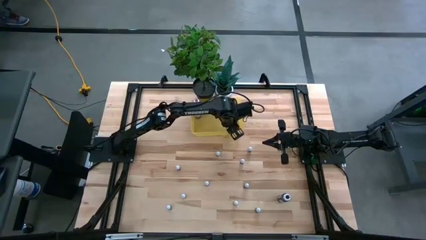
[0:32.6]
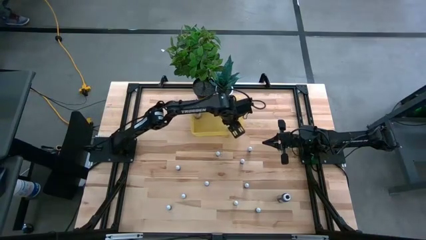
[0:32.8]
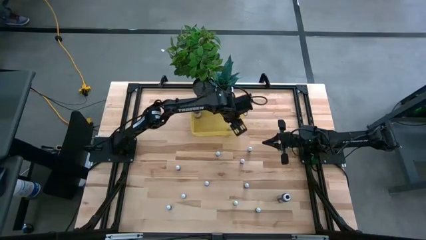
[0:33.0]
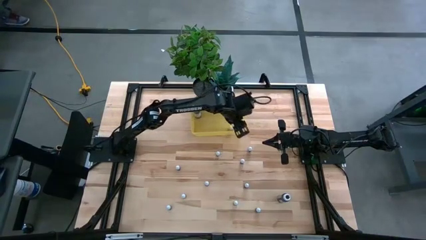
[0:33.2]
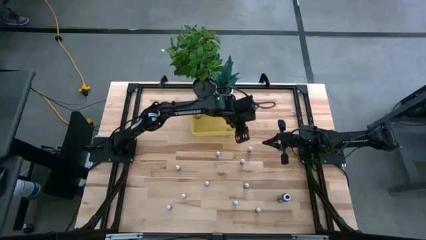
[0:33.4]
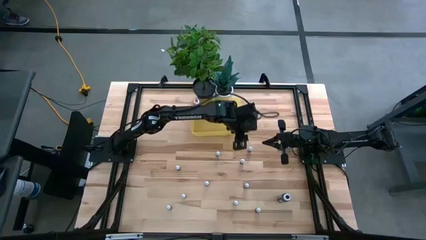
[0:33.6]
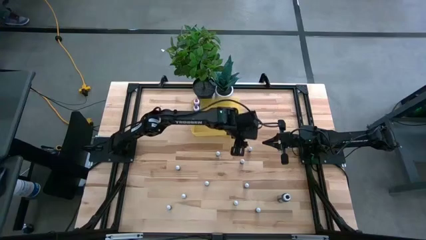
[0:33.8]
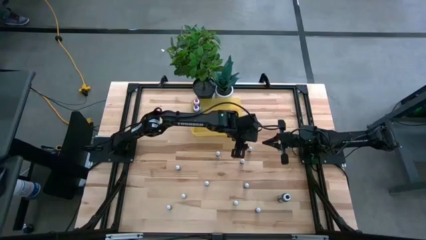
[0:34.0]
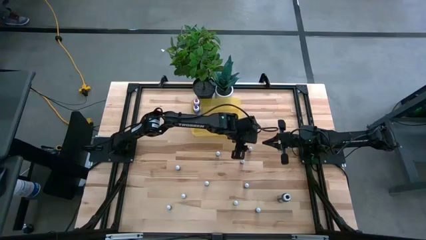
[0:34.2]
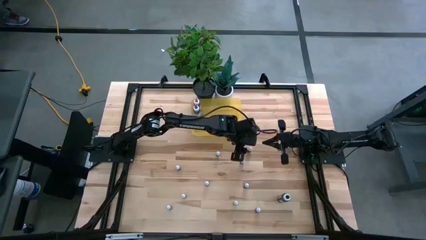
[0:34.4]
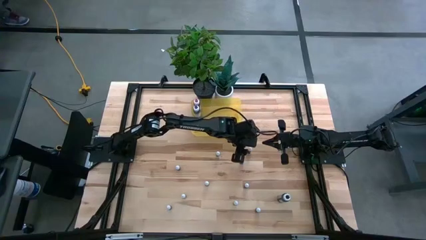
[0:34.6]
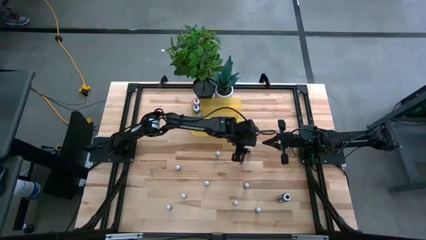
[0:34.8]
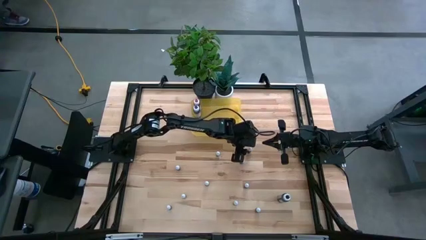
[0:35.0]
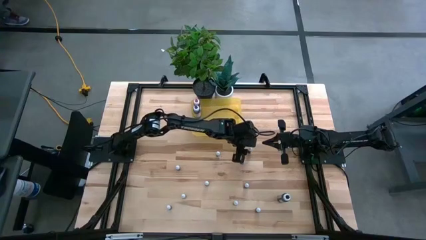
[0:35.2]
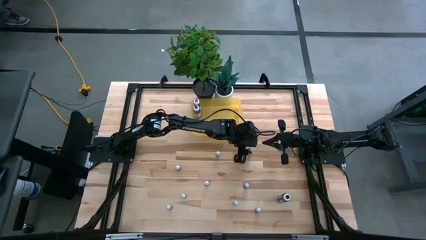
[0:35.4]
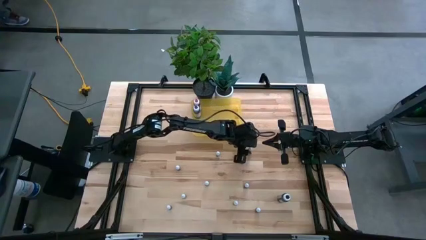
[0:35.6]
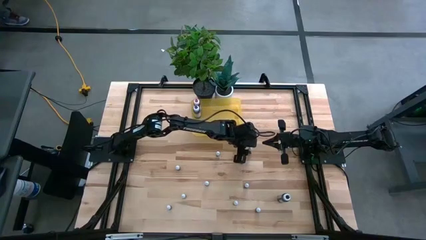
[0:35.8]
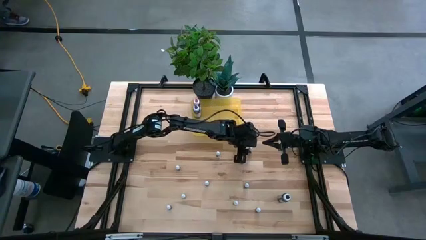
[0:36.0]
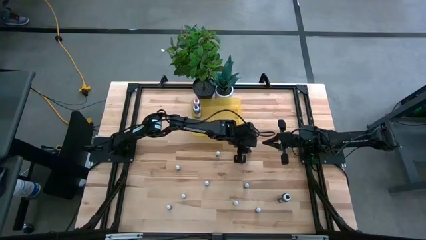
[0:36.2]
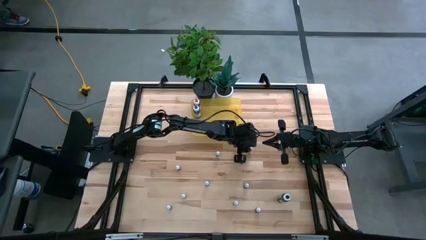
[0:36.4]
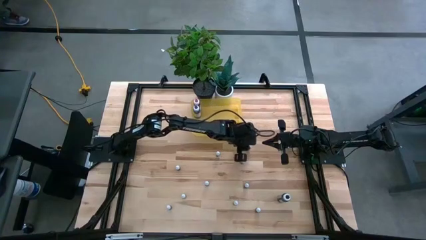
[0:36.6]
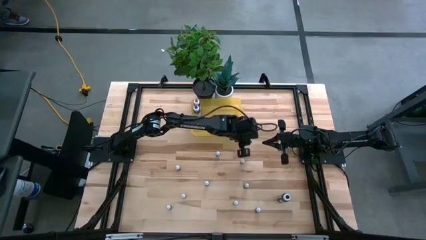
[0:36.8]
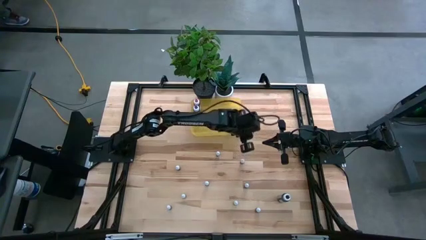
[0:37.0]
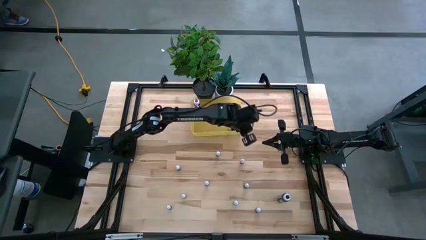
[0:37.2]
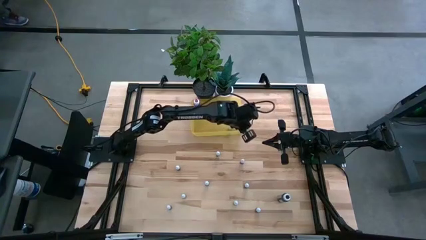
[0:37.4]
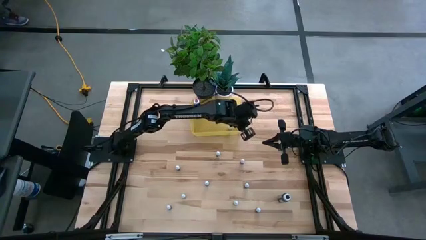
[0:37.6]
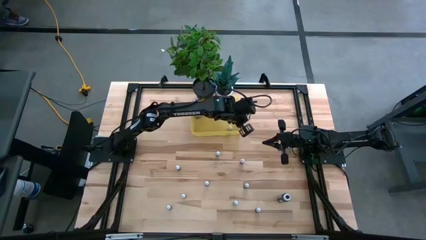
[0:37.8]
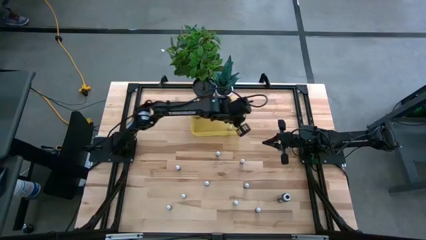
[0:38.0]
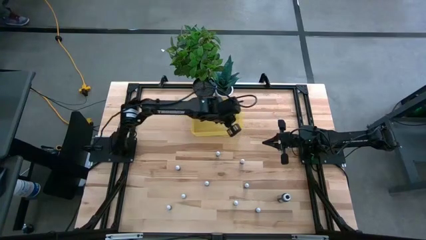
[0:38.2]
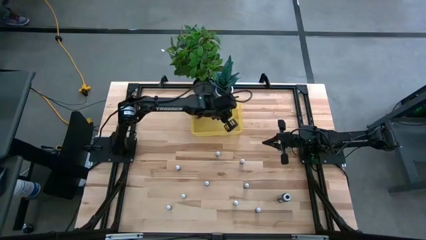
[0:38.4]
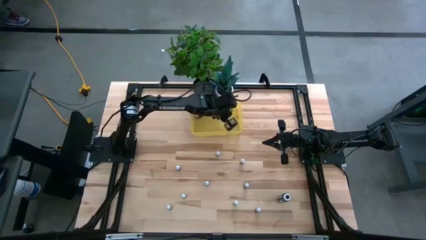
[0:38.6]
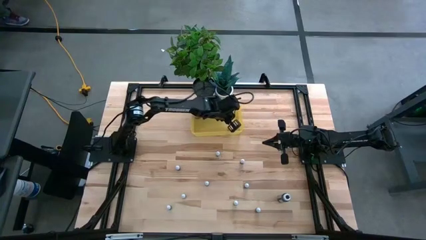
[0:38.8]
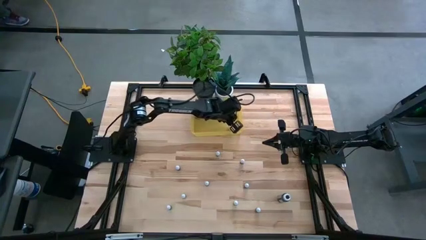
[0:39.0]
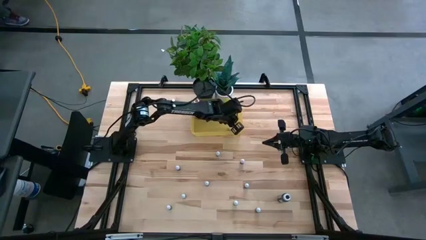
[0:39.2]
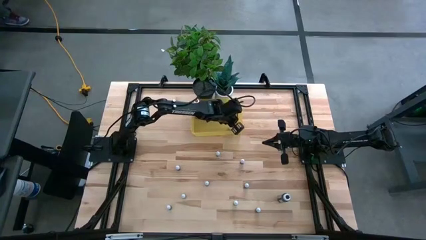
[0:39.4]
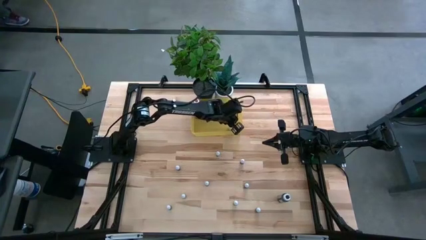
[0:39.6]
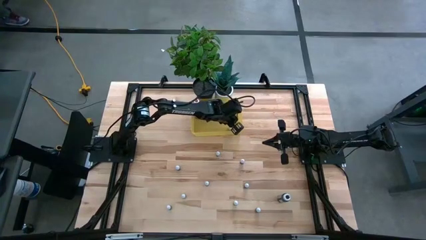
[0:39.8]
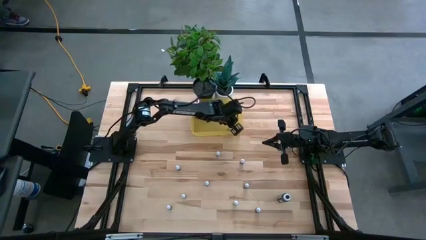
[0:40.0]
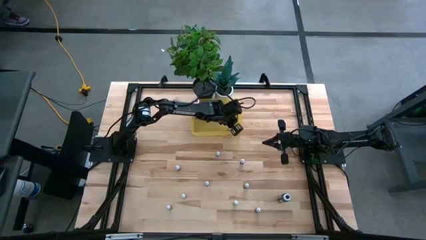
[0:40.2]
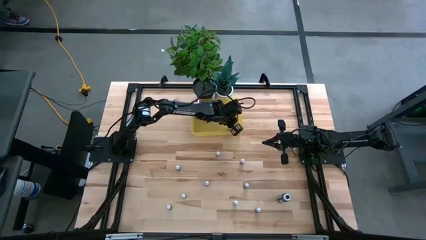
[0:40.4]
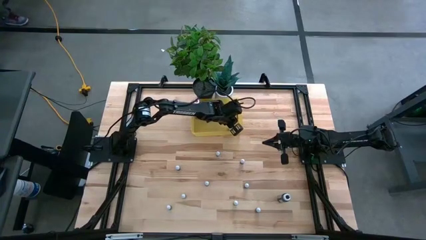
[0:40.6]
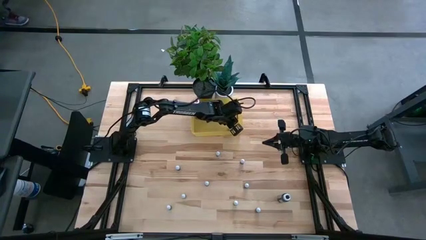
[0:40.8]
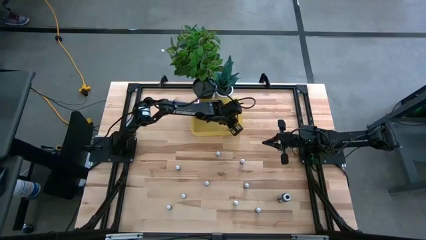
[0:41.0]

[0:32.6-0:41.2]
Task: Pick & Place food coloring
Put the small red food coloring bottle into the yellow bin

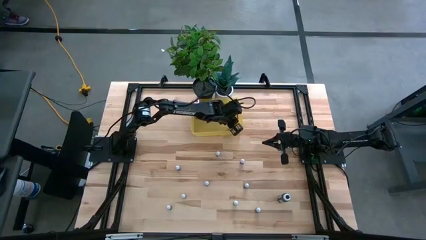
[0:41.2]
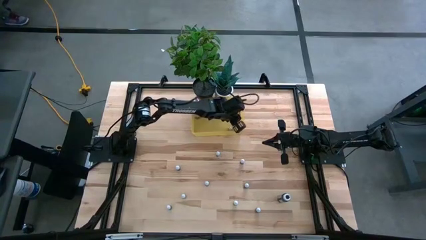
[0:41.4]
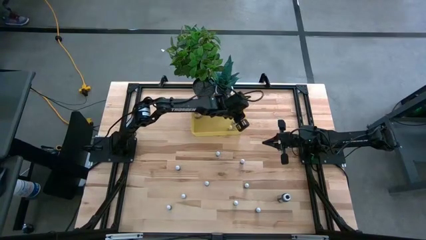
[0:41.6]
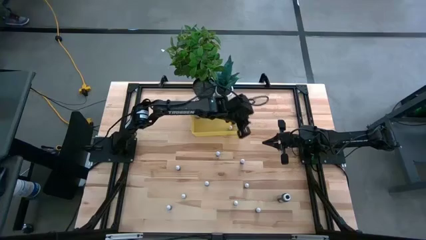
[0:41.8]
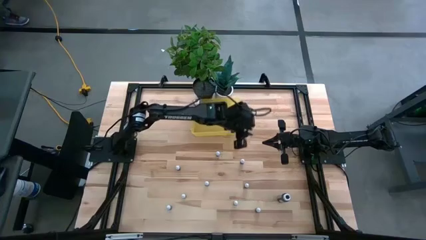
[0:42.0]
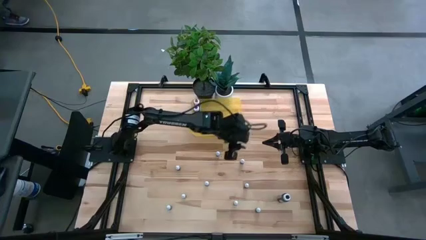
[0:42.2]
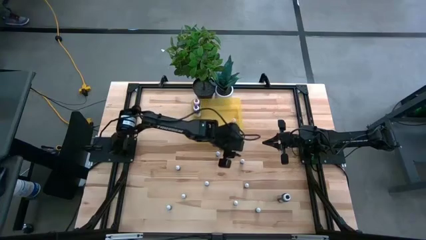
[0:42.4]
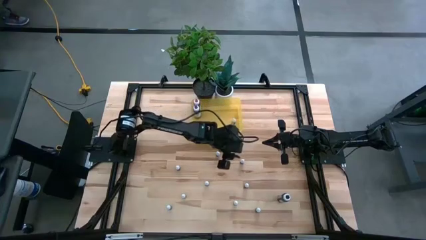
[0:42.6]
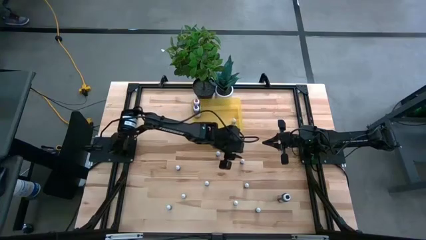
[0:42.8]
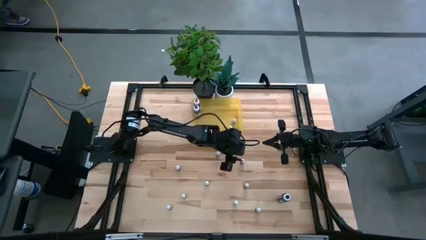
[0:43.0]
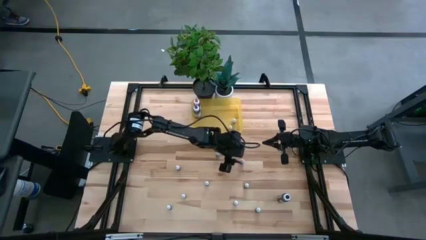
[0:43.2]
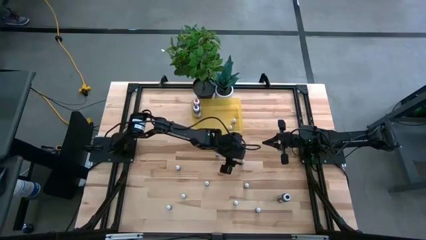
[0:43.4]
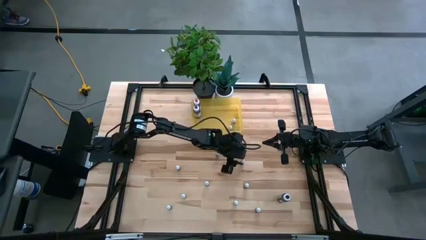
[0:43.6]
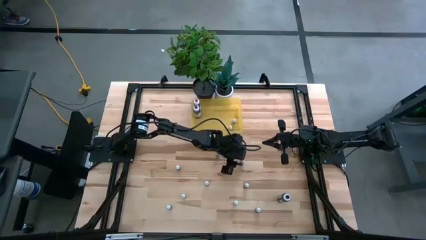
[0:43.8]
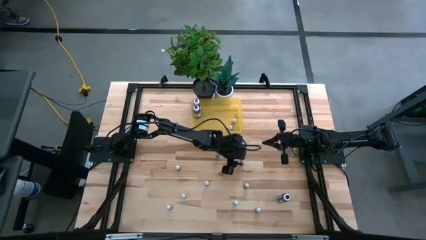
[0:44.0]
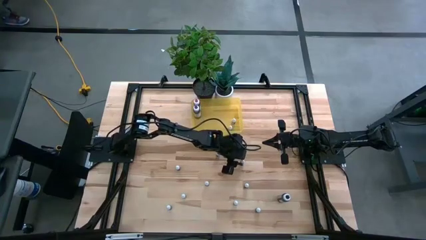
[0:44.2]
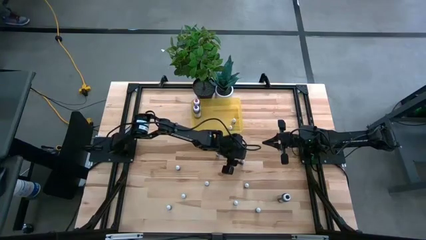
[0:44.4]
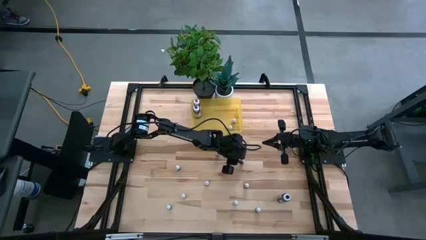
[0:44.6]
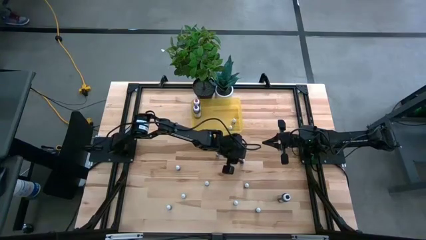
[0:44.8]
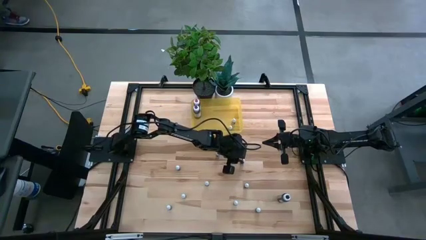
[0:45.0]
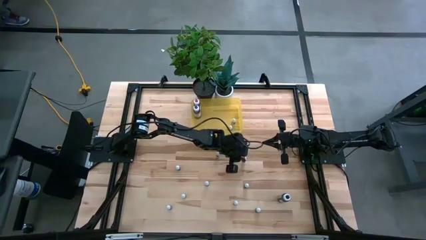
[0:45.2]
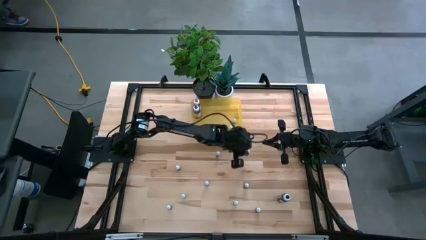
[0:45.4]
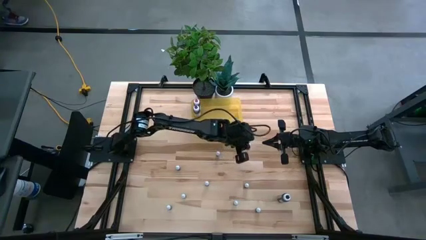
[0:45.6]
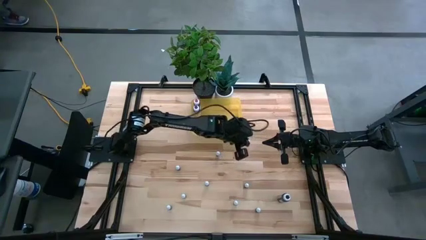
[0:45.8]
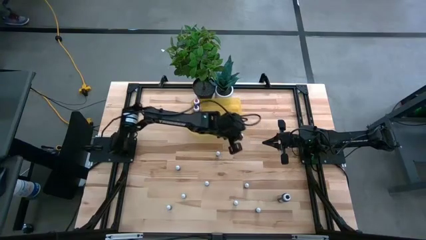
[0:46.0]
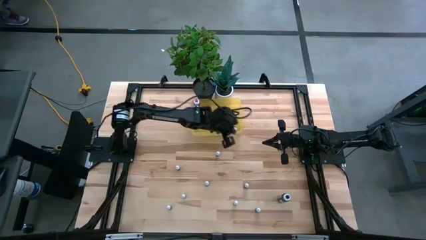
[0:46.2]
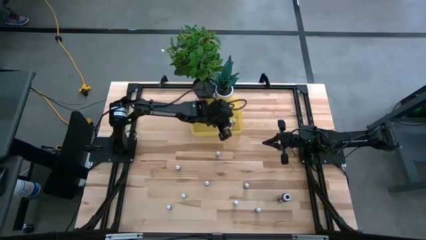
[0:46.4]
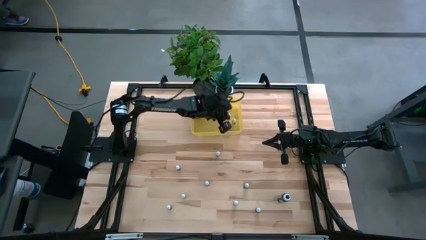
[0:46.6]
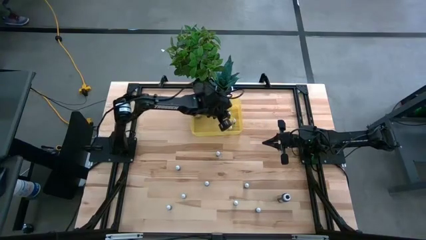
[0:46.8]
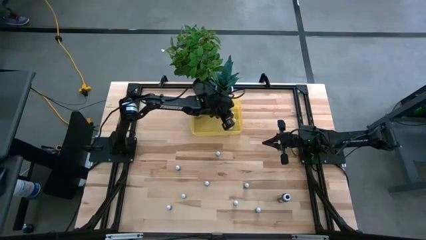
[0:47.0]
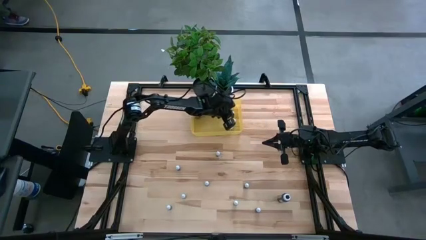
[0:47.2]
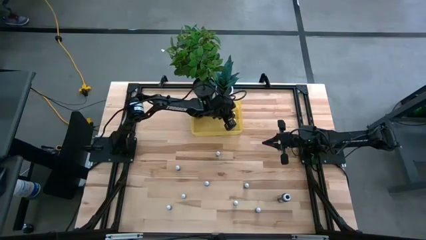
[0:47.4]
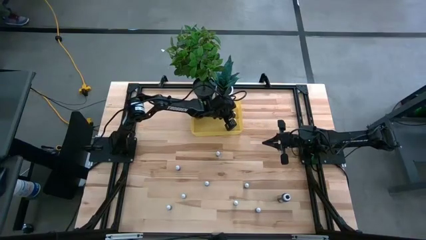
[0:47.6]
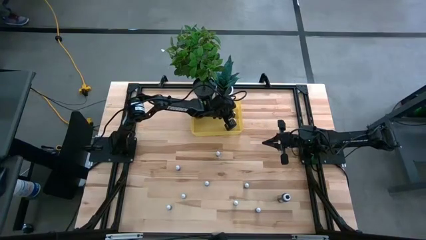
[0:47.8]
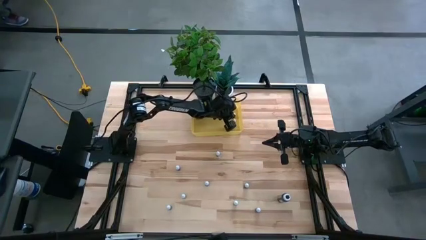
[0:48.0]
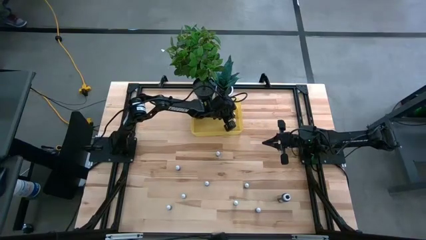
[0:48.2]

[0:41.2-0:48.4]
Put the small orange food coloring bottle into the yellow bin
